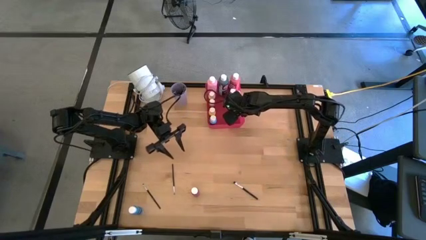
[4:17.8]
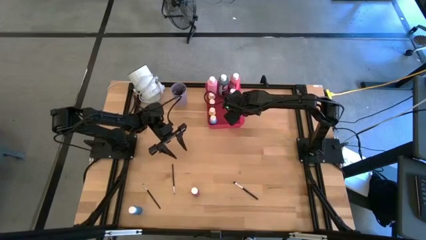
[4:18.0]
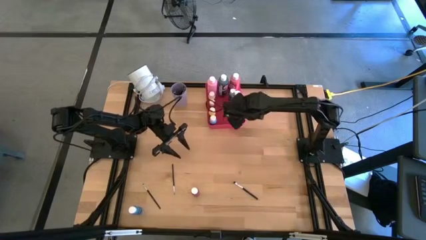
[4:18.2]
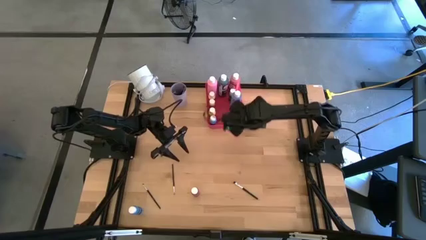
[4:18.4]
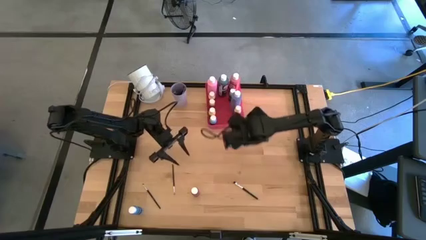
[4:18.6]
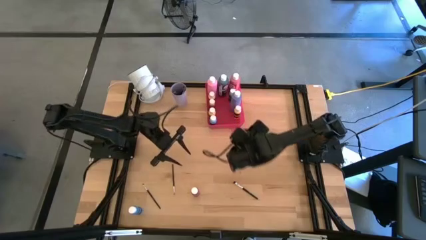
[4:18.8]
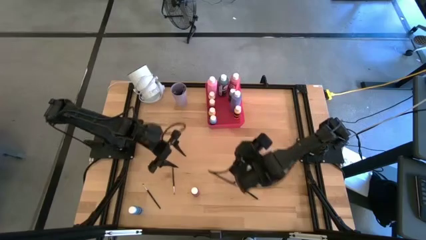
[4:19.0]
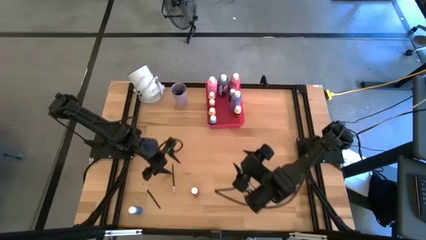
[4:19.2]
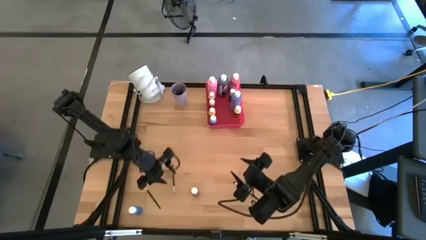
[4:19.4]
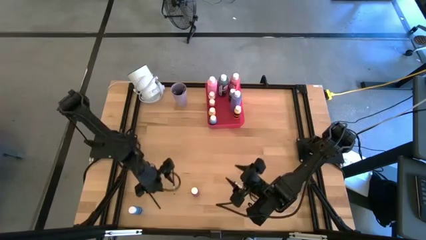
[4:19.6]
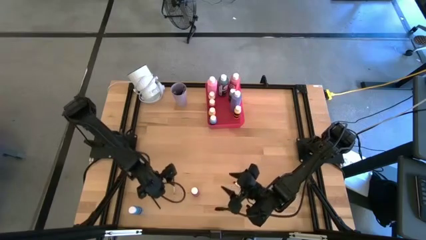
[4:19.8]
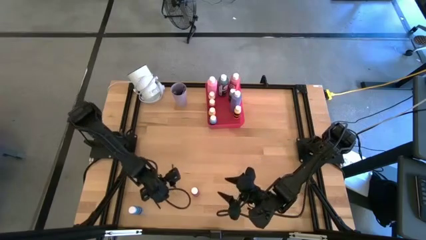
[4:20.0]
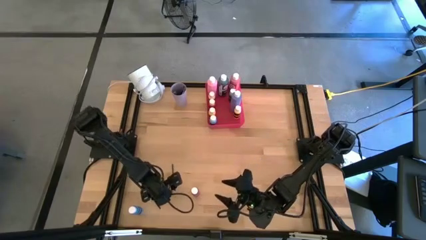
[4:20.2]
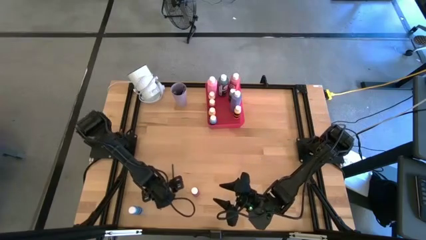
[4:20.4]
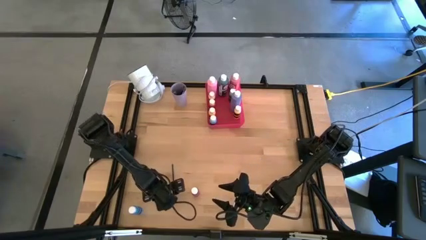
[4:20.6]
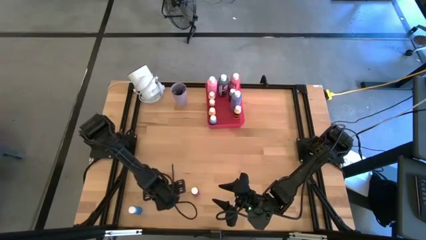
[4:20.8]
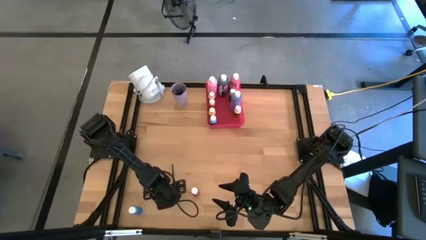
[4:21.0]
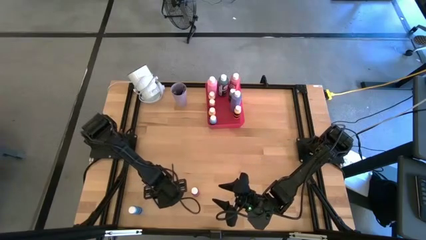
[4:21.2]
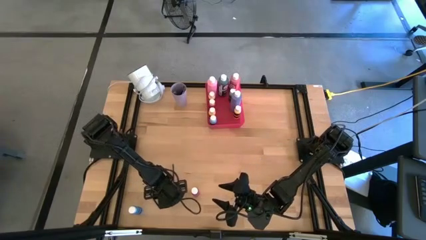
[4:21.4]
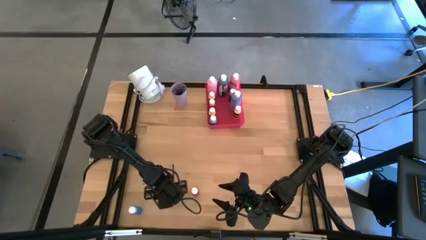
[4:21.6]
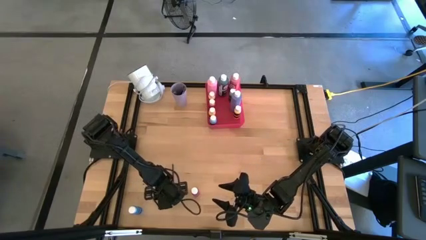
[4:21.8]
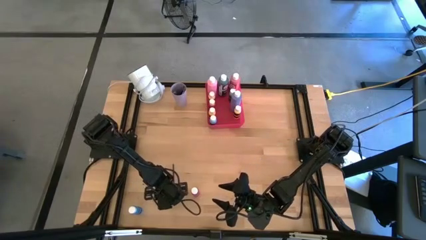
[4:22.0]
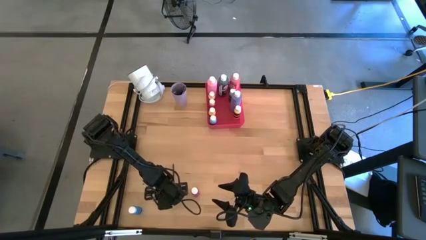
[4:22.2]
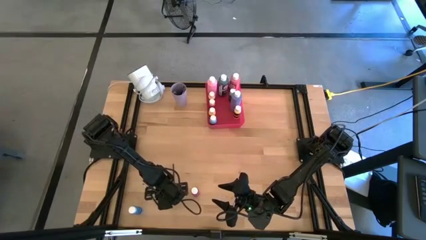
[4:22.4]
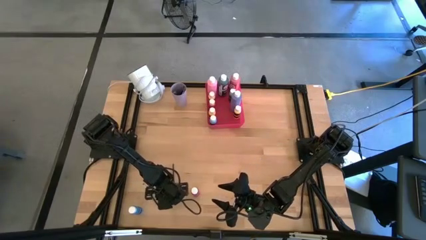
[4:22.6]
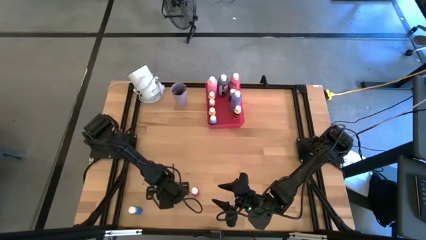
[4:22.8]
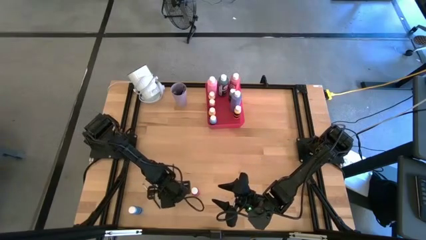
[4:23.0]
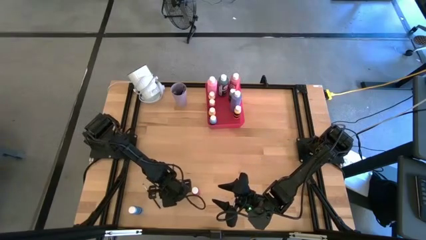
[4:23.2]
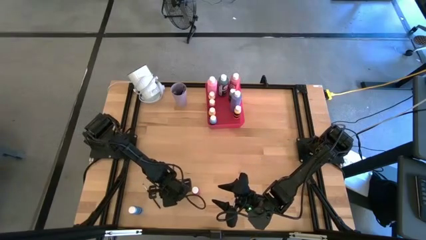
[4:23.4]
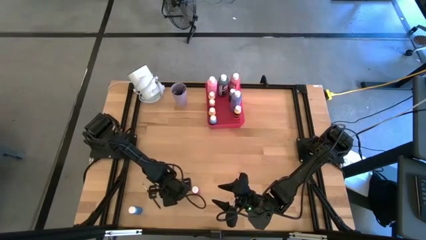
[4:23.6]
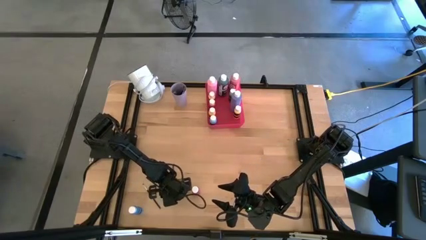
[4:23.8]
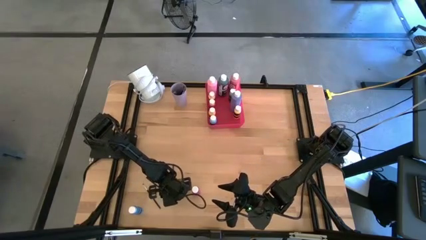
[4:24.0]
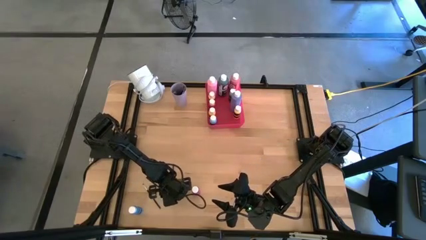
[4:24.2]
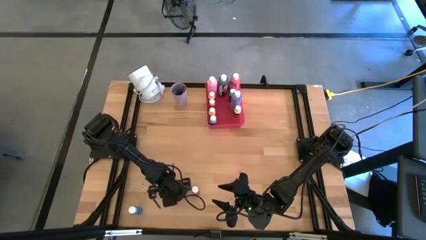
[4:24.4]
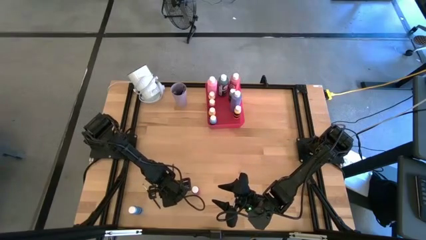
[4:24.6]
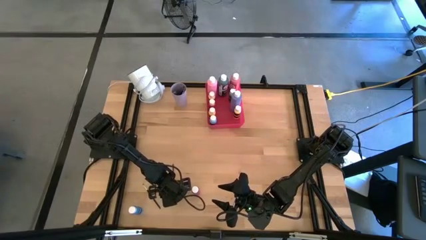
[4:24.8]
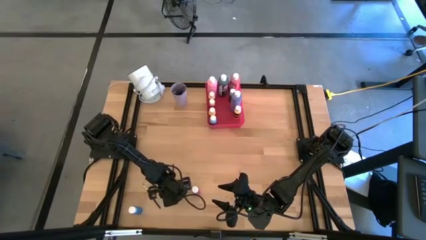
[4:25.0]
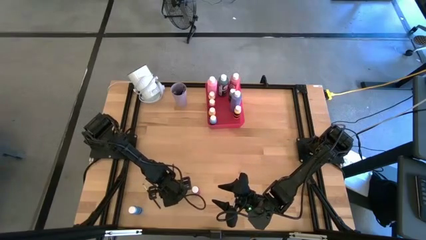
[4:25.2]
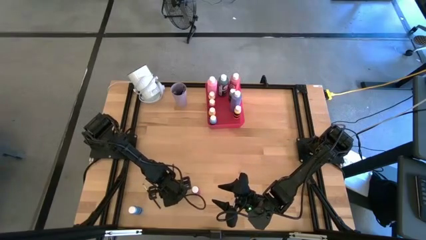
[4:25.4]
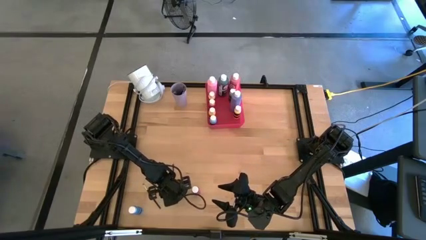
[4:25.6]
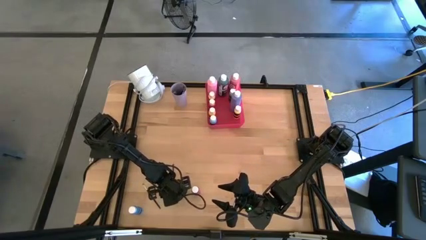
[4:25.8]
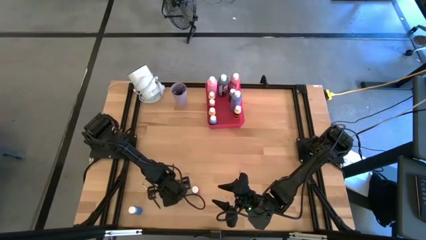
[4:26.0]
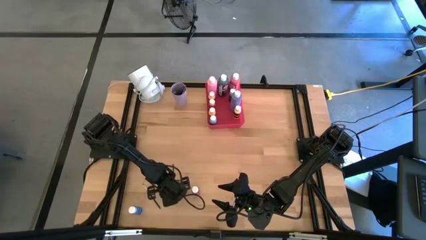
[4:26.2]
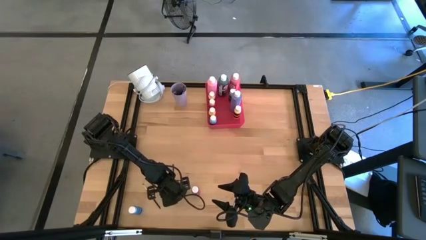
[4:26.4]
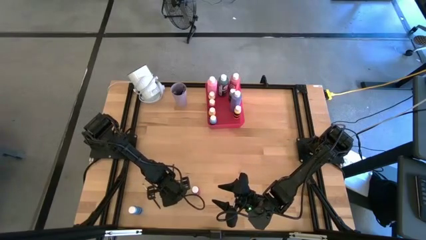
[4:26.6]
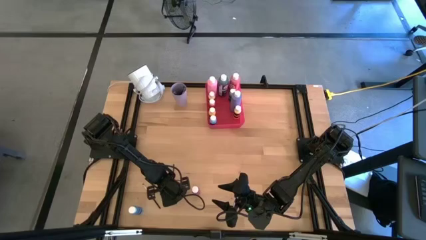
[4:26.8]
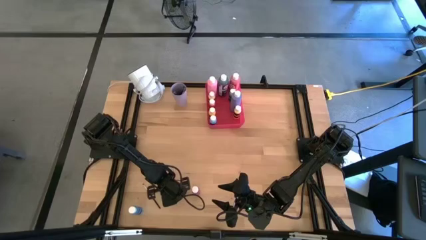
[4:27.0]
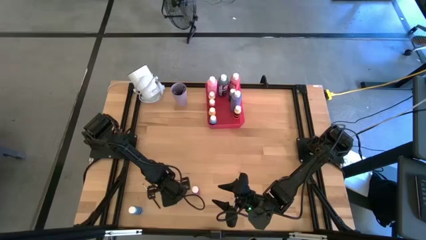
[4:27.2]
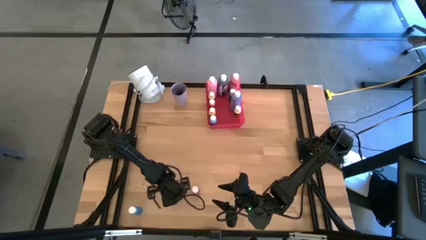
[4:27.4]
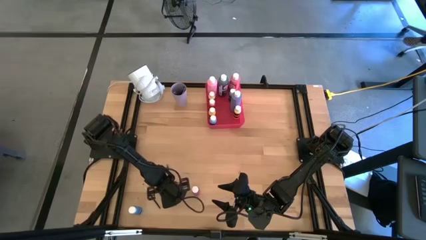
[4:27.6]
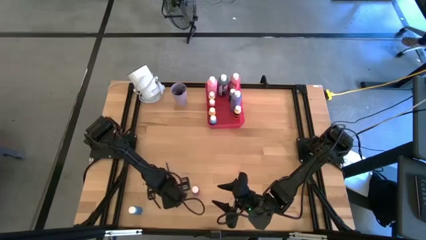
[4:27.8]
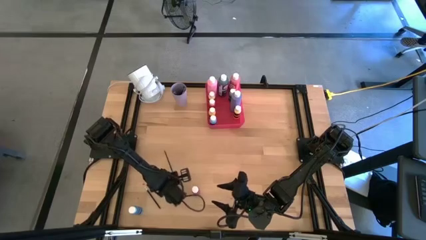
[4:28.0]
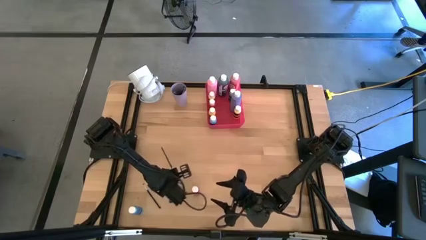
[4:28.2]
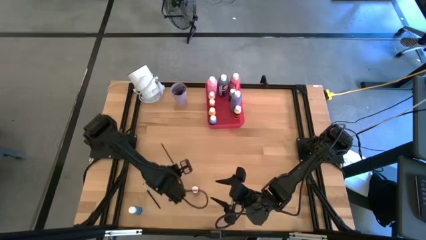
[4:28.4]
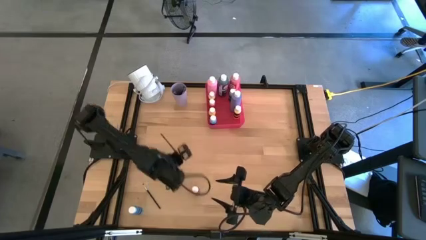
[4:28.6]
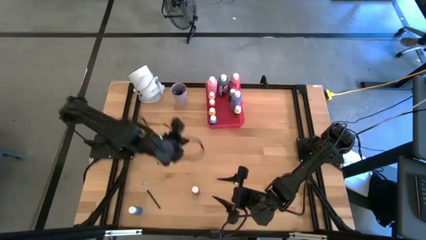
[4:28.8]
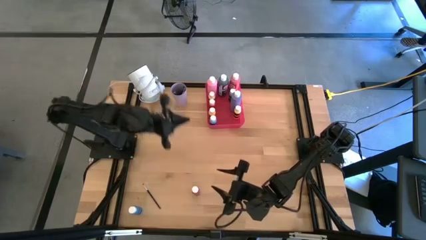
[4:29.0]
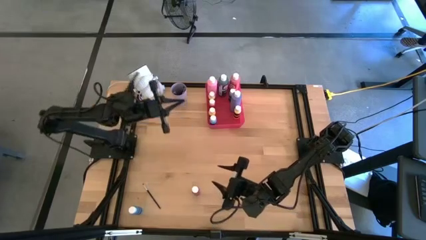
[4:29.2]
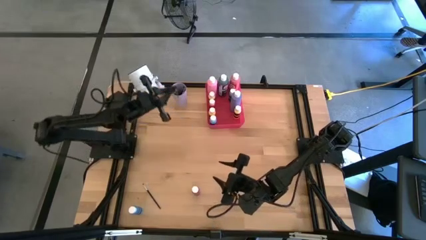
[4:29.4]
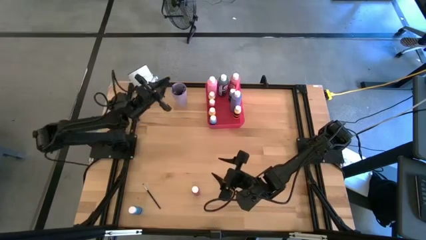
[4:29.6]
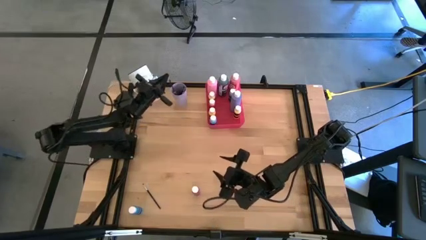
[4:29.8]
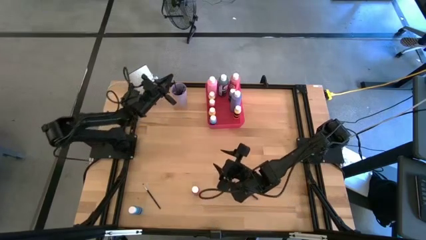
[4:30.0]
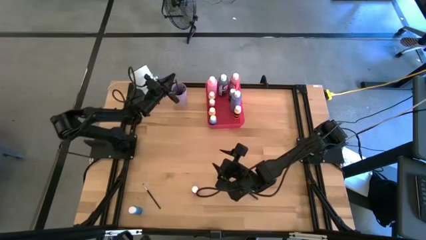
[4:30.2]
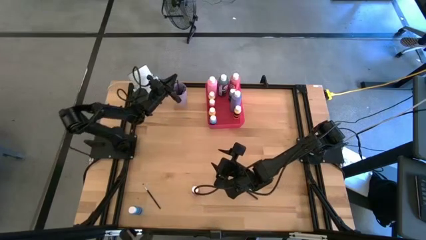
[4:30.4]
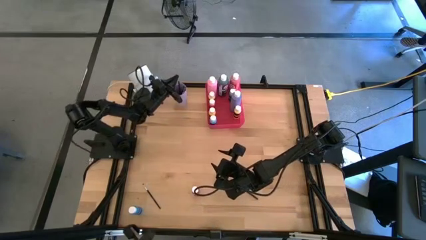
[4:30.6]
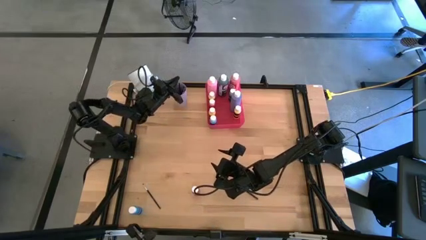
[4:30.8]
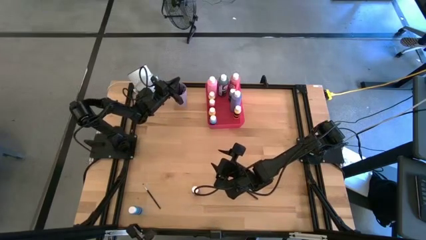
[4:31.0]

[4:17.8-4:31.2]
Task: Pick & Place Paint Supplies
Put the black paint brush into the purple cup

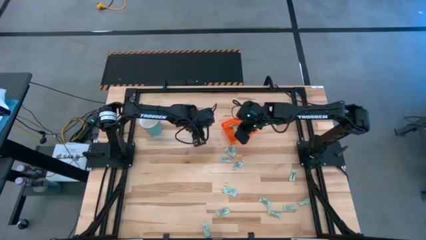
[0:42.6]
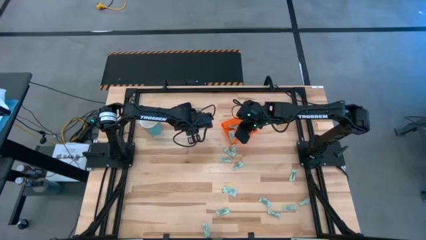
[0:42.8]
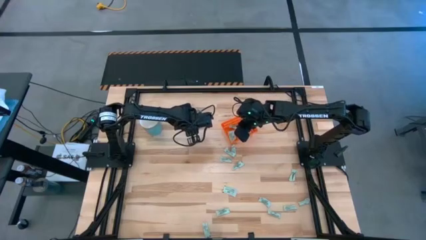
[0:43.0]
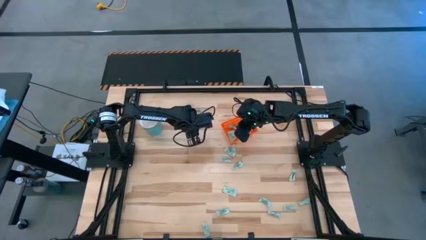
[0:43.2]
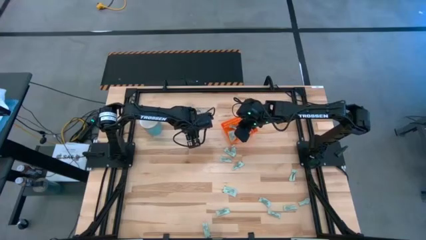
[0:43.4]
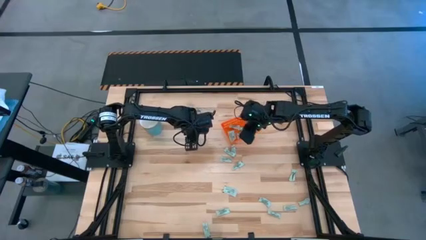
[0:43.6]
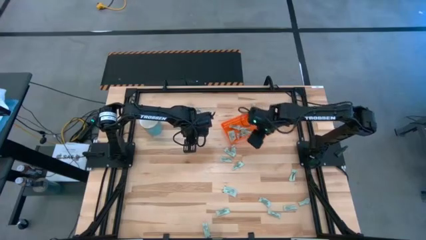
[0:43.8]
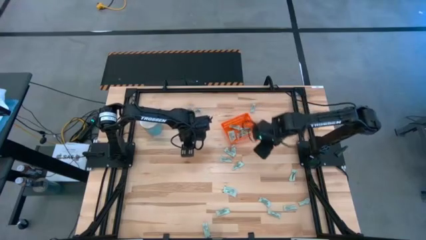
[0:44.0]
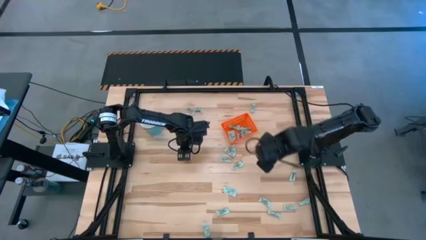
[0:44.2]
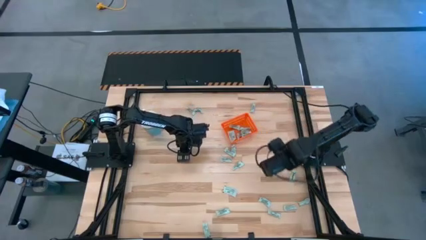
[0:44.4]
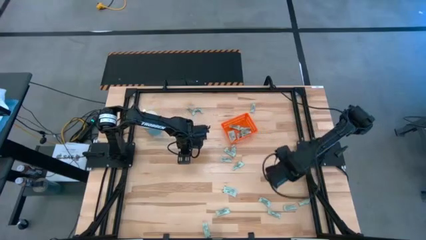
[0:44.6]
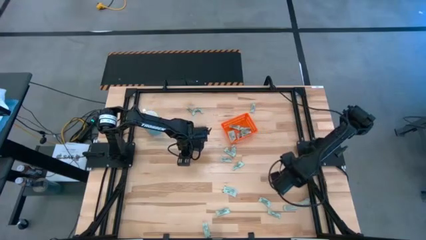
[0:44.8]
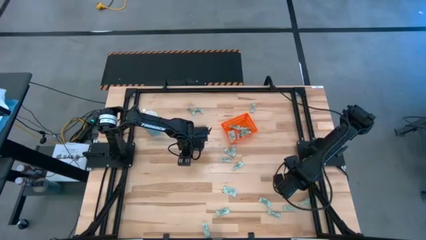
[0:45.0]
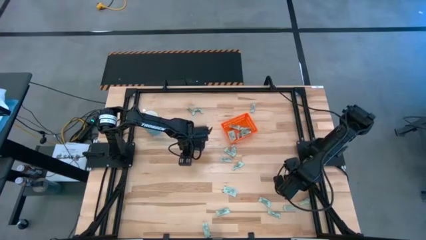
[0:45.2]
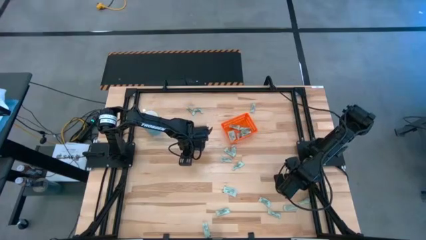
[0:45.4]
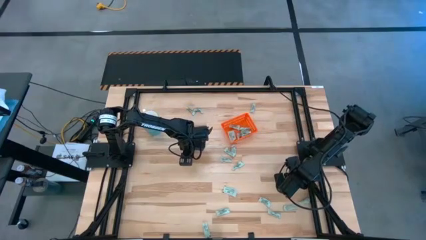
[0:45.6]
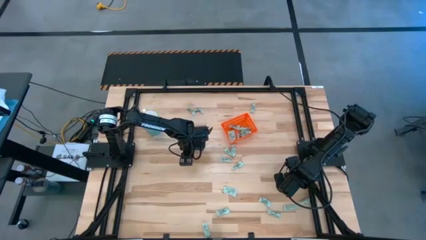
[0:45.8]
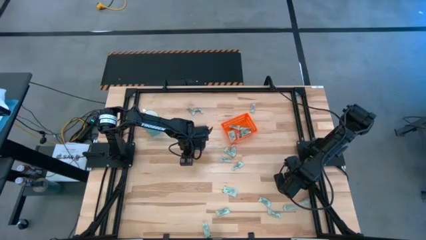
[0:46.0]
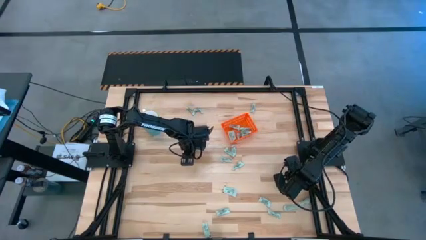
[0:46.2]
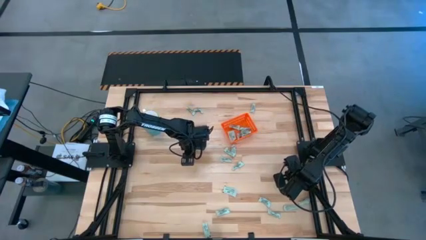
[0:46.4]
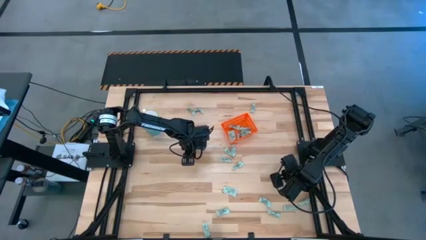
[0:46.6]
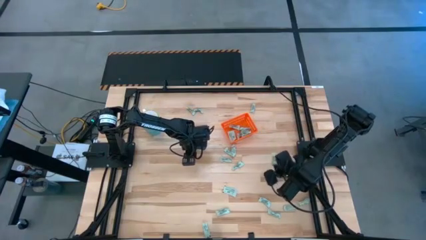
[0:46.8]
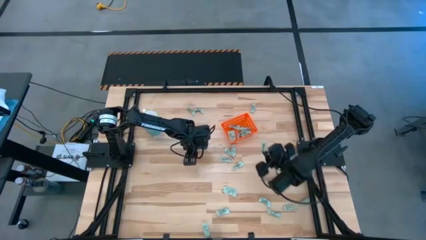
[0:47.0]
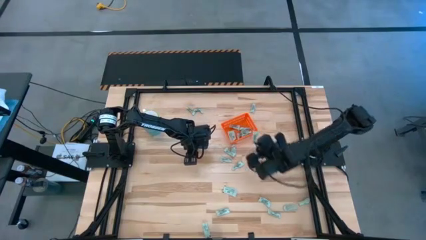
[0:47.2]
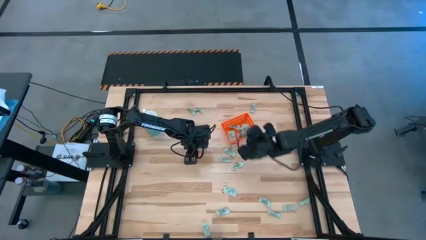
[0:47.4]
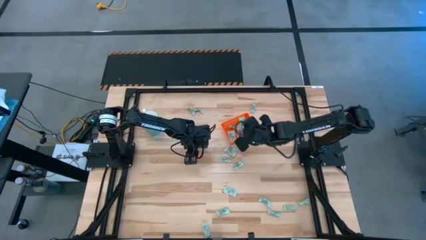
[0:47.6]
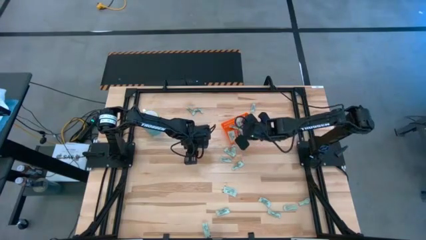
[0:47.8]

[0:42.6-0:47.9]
Task: Pick and place Stevia / Truvia into bins
Put the stevia packet into the bin
